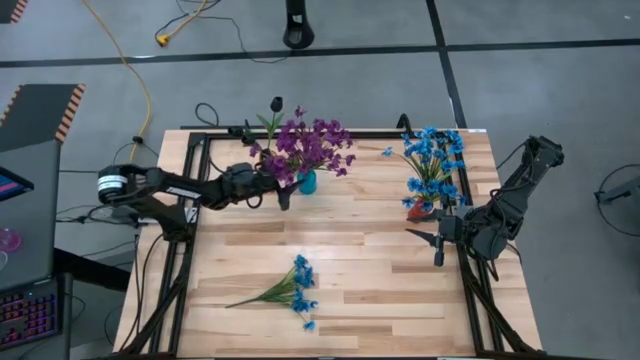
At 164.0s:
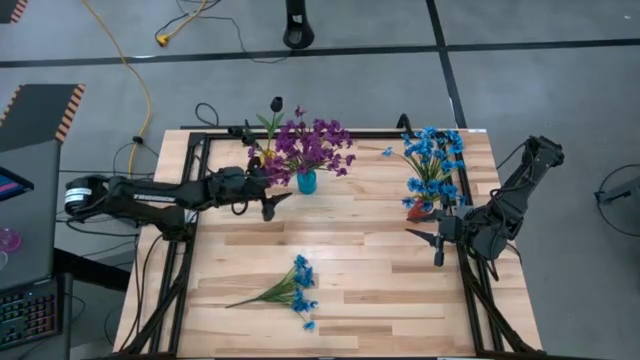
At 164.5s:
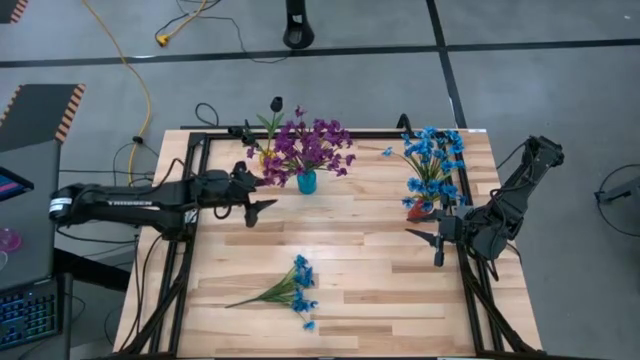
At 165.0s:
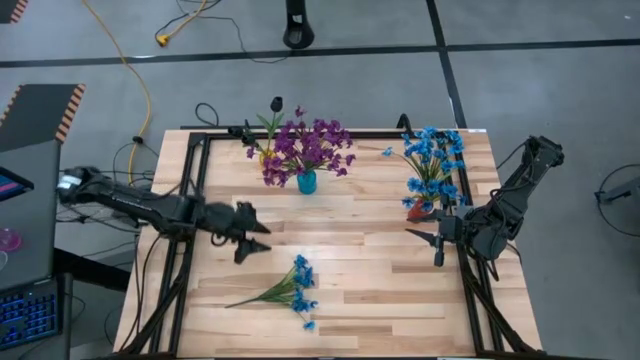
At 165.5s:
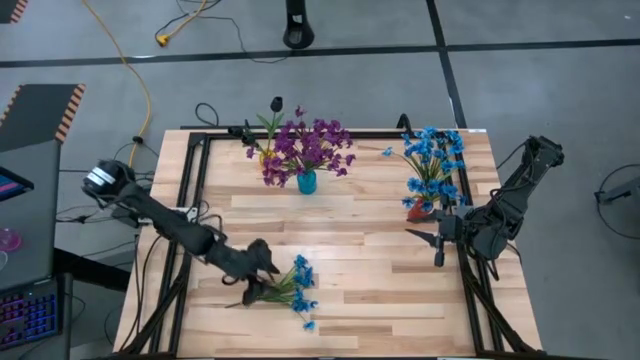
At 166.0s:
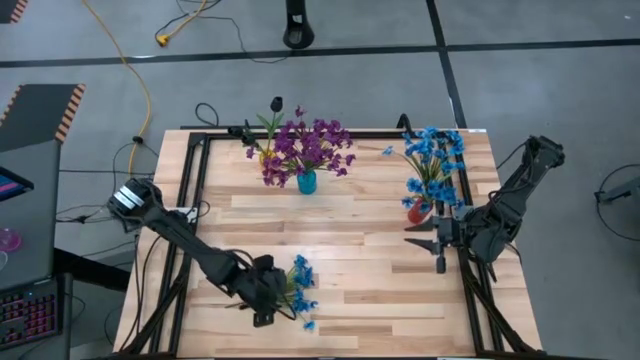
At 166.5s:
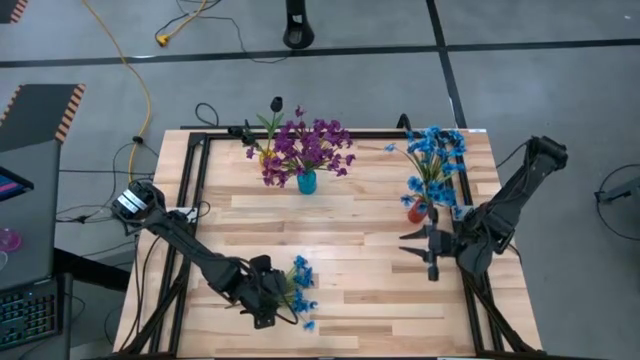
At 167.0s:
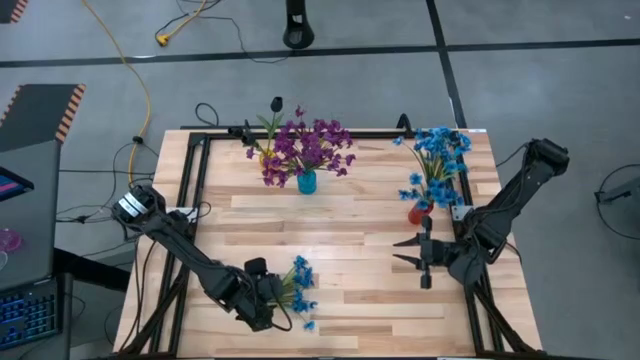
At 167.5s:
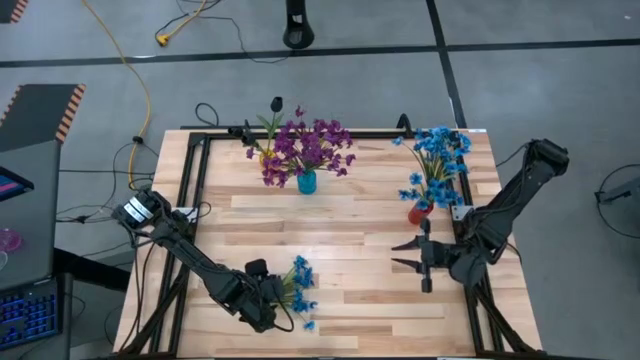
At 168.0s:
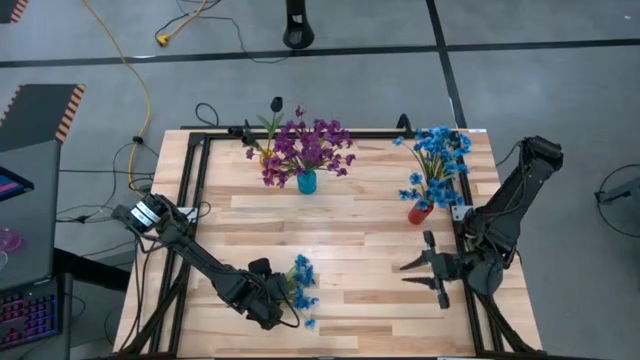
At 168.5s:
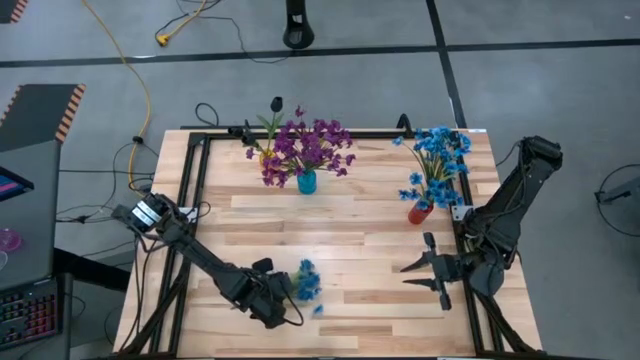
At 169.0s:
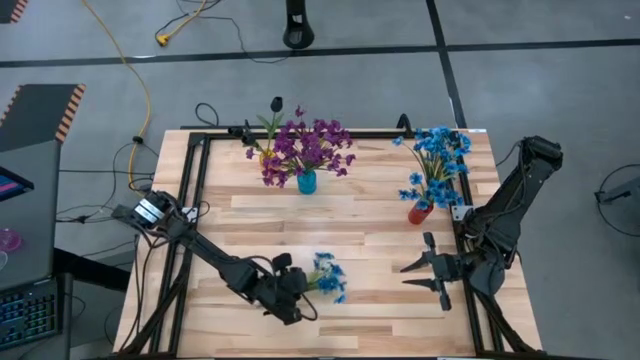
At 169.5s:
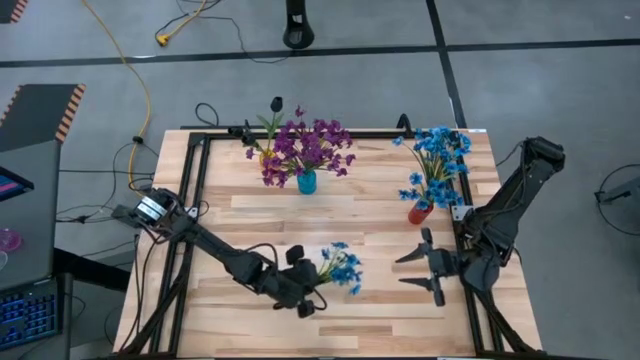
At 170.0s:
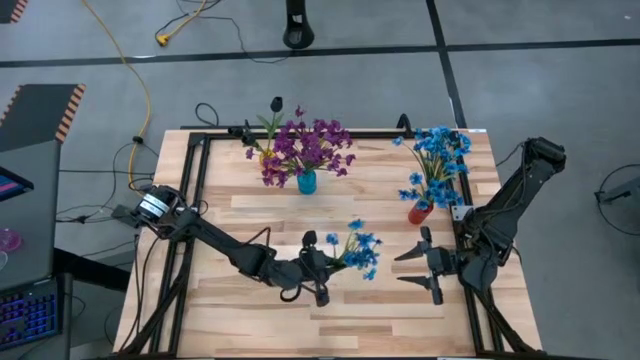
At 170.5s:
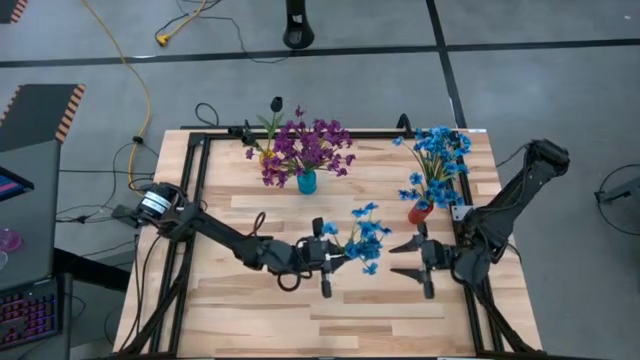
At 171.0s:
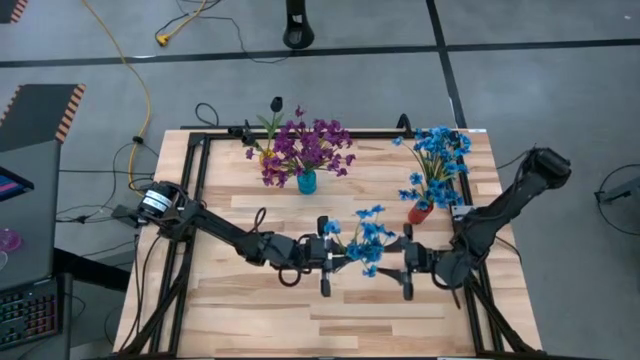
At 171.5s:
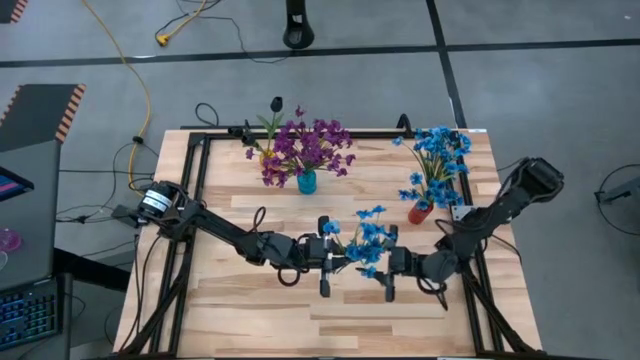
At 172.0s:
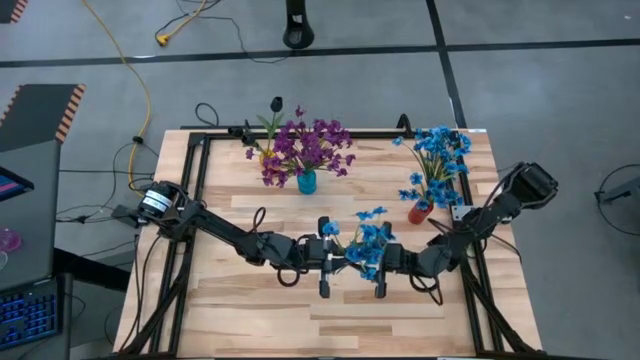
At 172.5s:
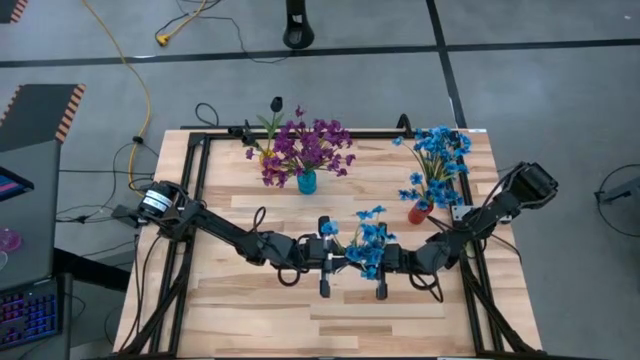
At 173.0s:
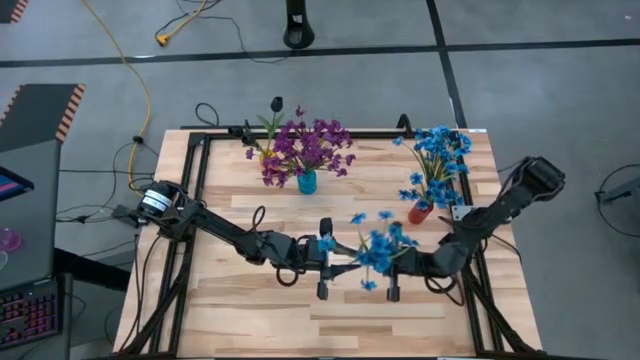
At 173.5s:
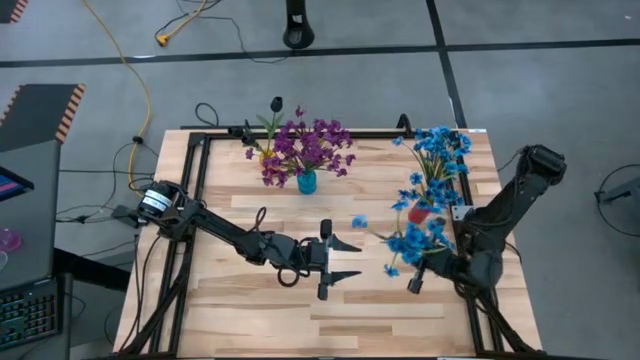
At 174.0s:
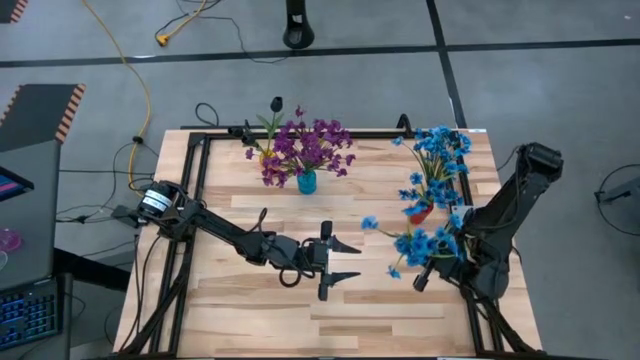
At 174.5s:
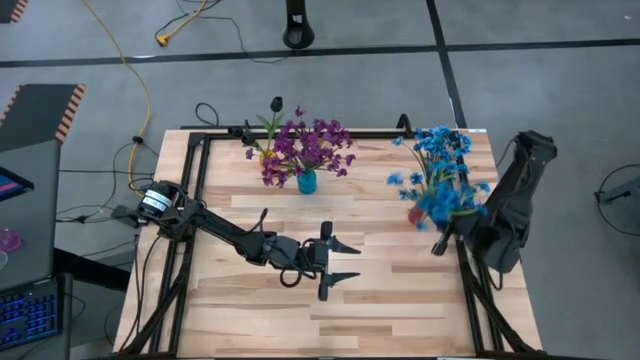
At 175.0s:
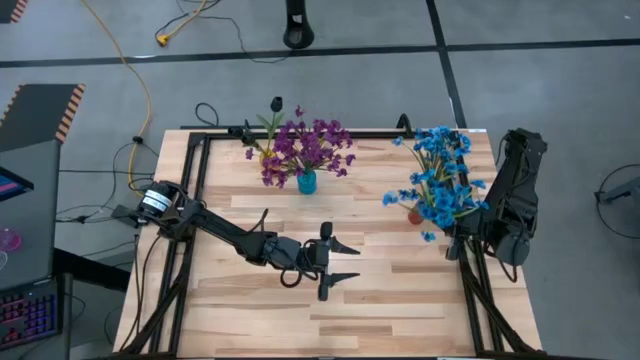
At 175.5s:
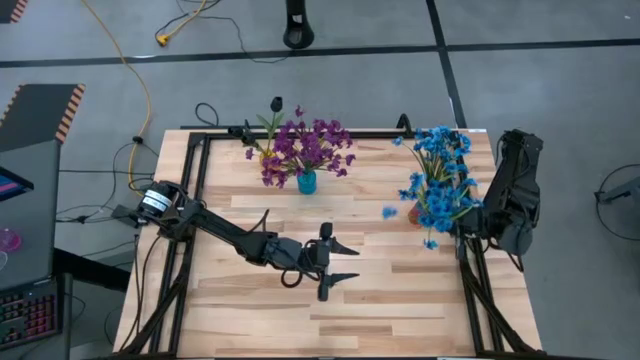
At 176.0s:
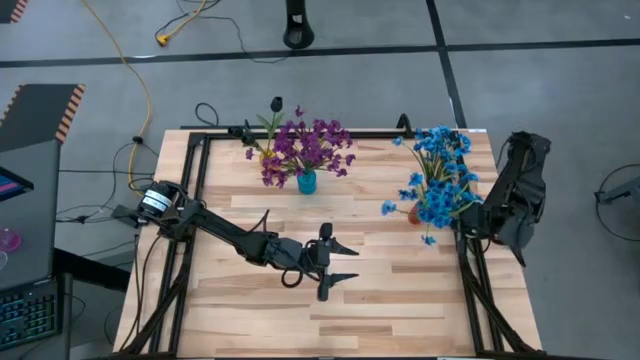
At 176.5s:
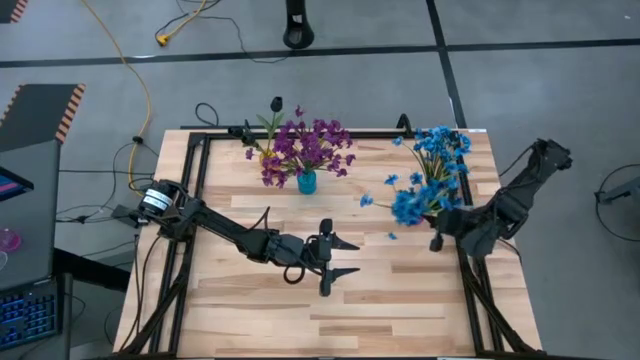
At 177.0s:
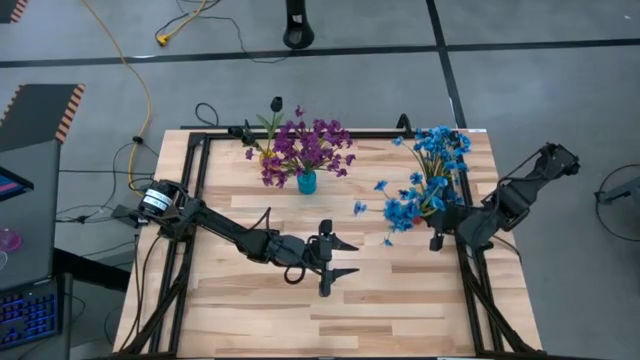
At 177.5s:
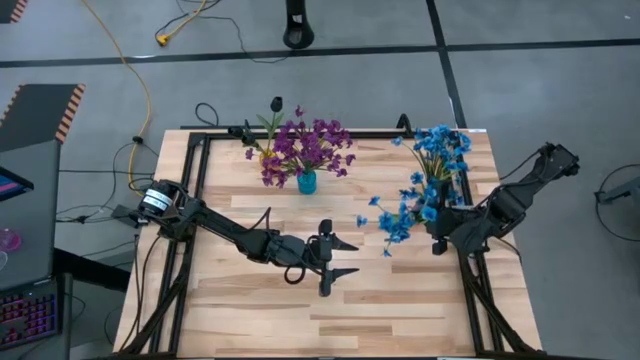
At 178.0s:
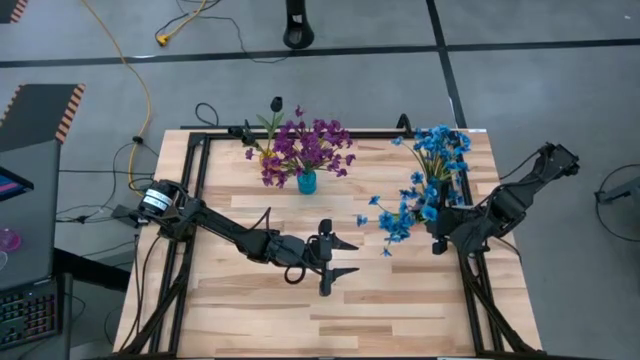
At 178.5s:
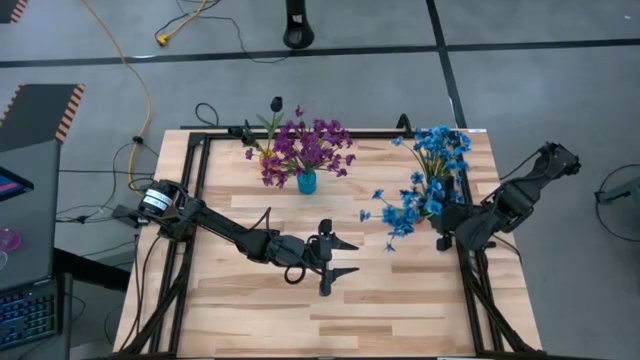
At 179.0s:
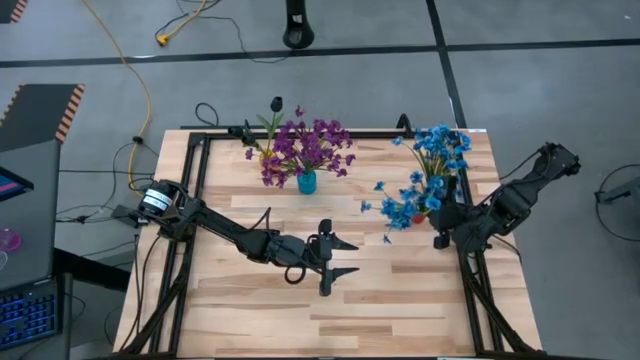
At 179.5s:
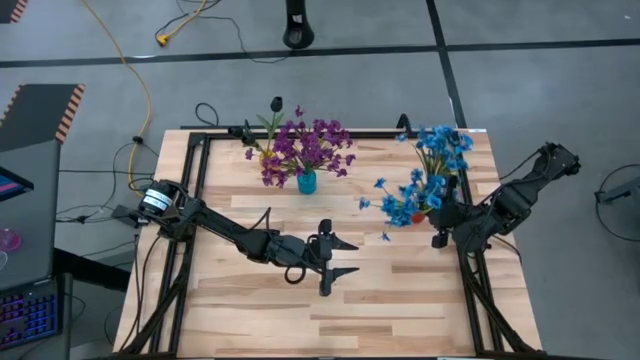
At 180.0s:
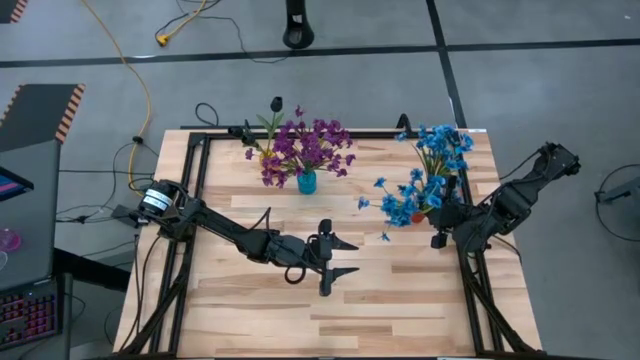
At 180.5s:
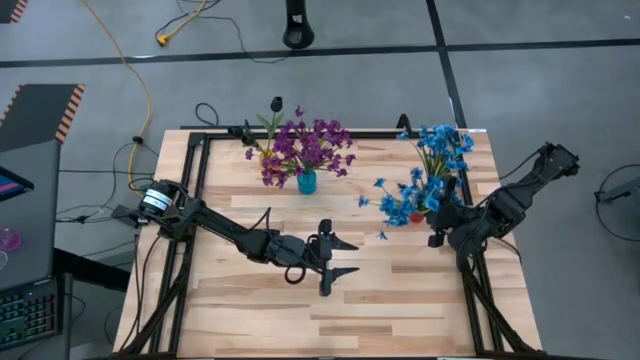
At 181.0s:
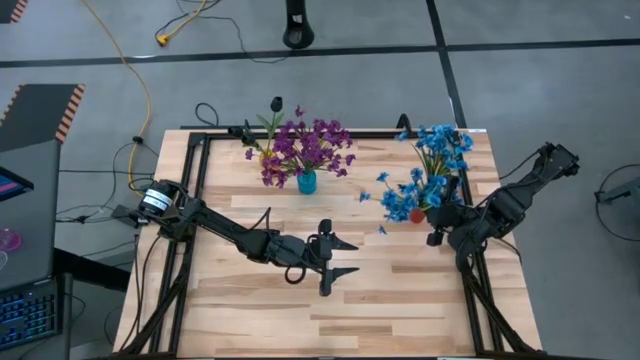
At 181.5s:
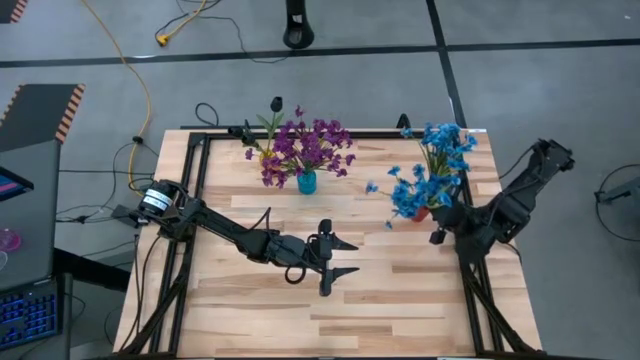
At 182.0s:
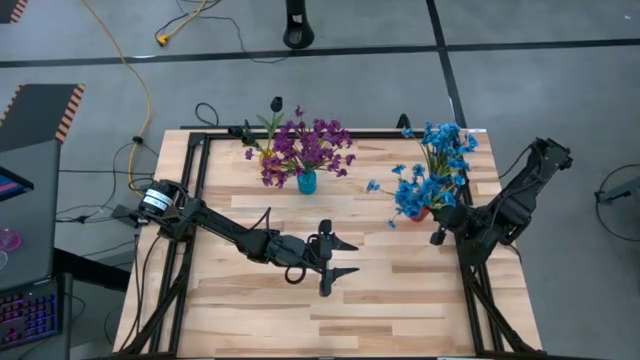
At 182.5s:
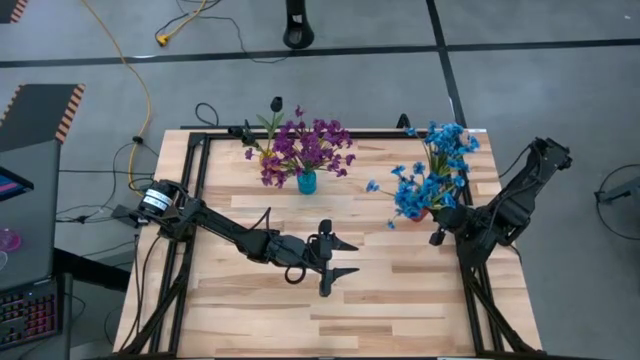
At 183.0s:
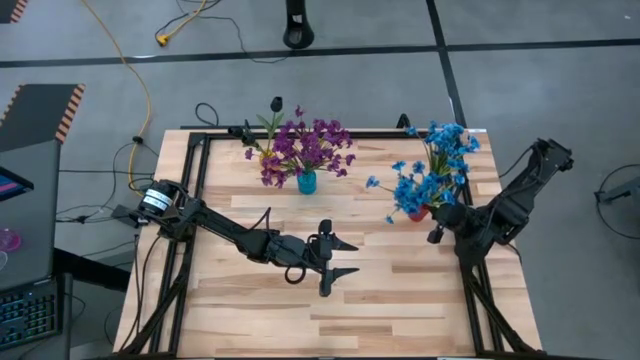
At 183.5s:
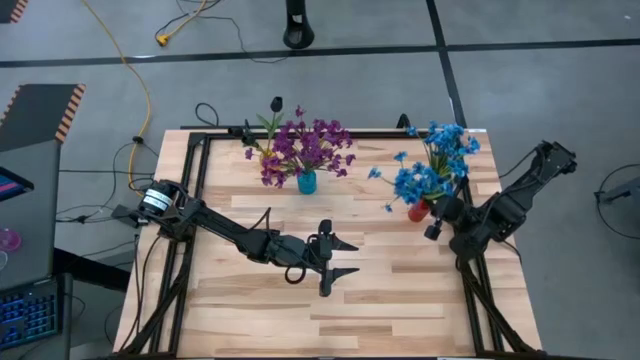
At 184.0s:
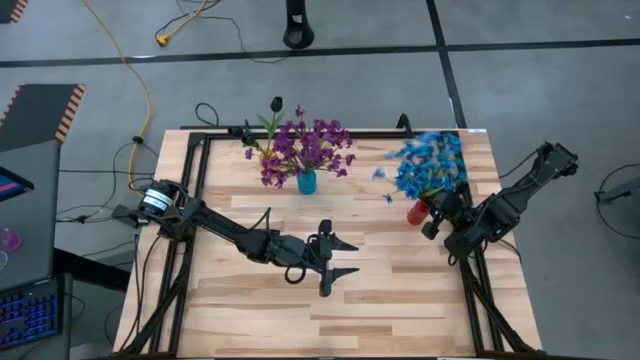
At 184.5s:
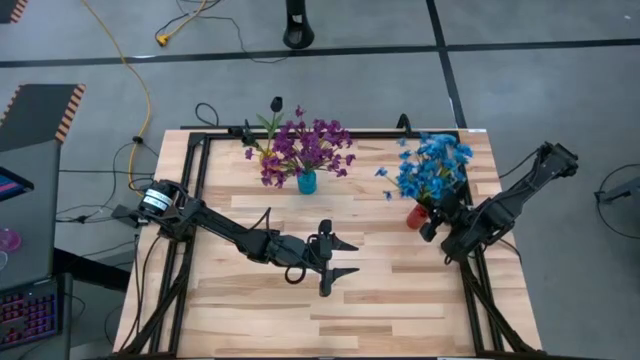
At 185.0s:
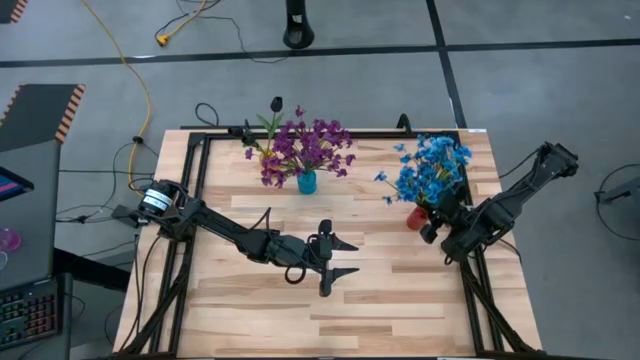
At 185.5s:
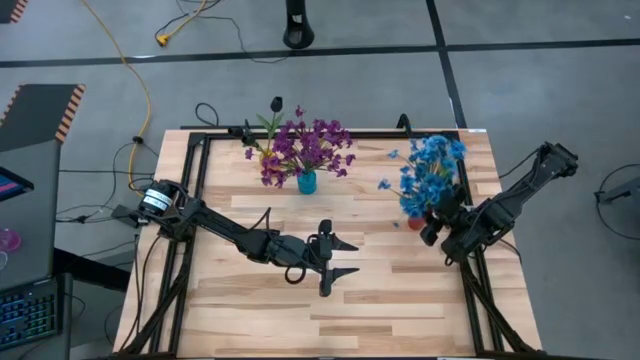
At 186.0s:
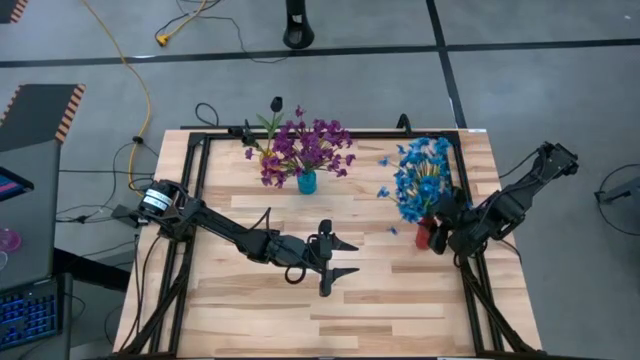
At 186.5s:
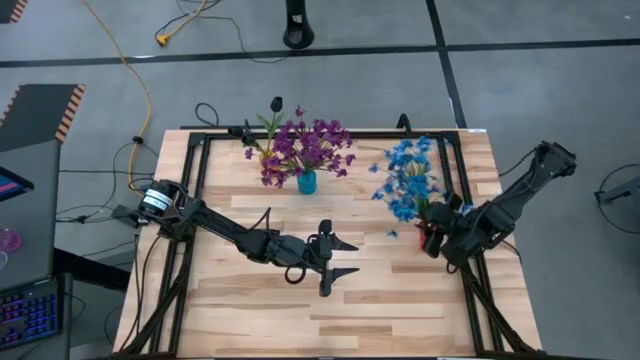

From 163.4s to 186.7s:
Task: Sort flowers into vase by color
Put the blue flower into the red vase
